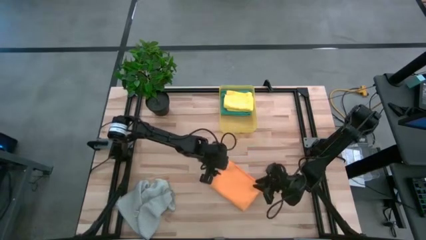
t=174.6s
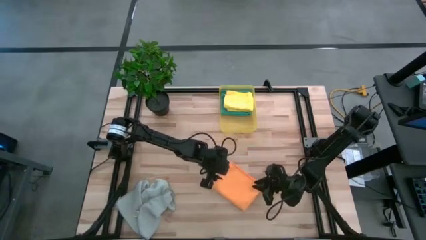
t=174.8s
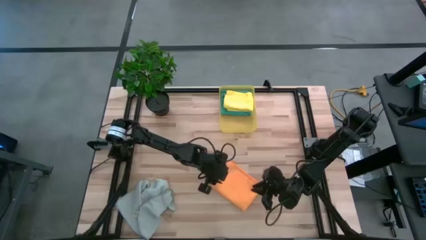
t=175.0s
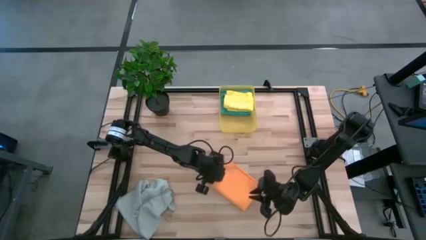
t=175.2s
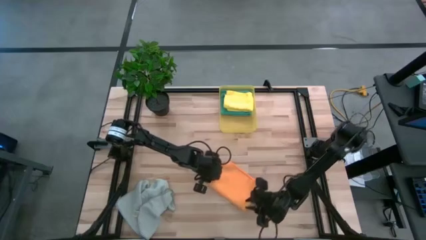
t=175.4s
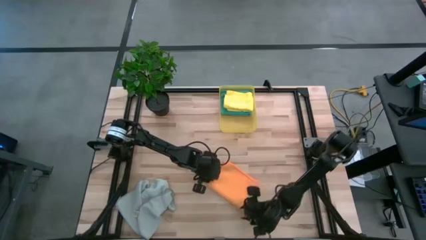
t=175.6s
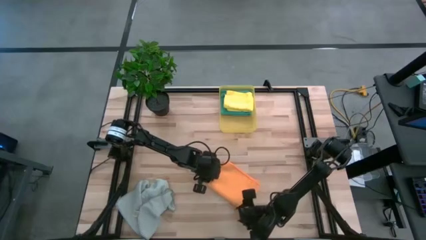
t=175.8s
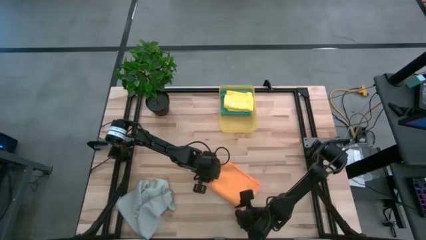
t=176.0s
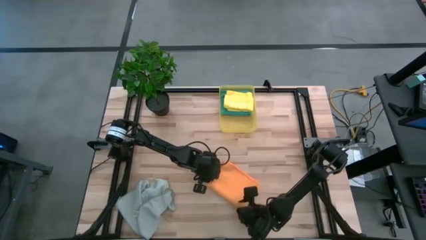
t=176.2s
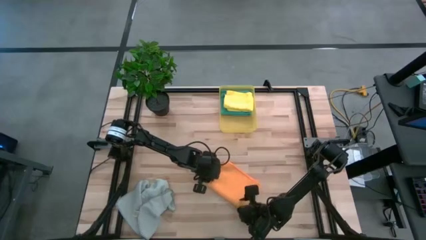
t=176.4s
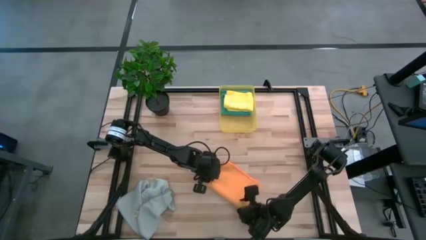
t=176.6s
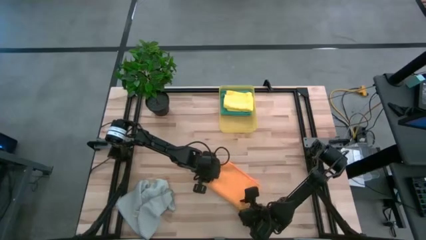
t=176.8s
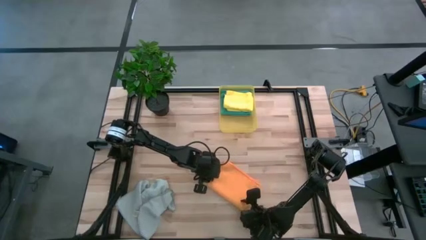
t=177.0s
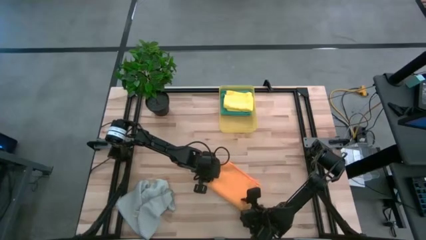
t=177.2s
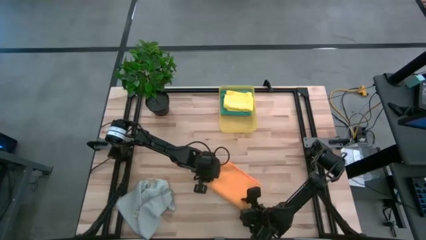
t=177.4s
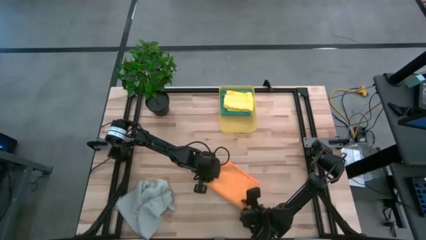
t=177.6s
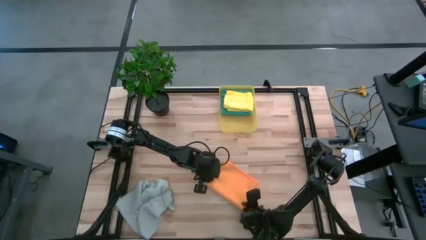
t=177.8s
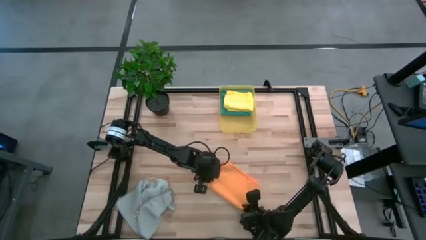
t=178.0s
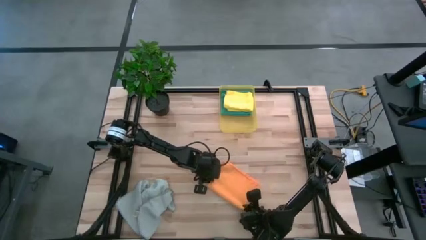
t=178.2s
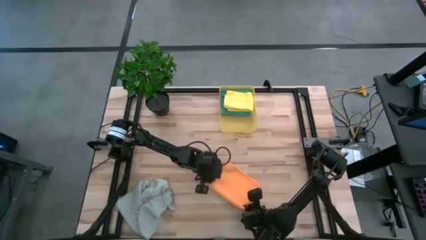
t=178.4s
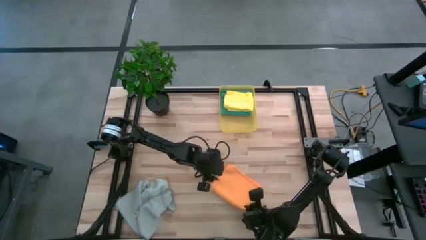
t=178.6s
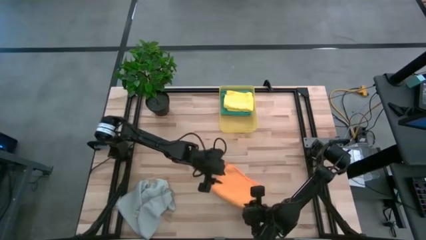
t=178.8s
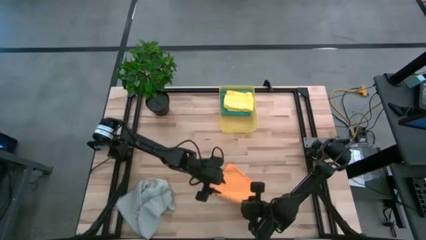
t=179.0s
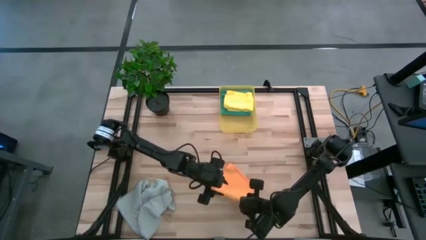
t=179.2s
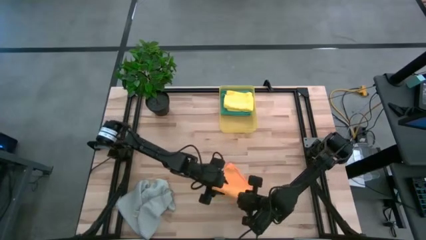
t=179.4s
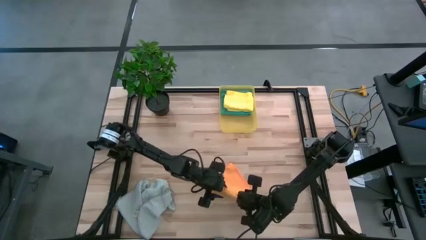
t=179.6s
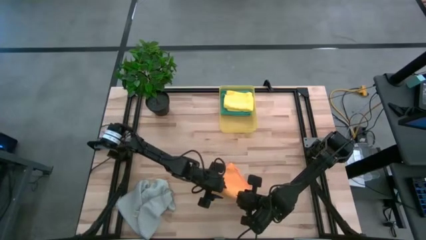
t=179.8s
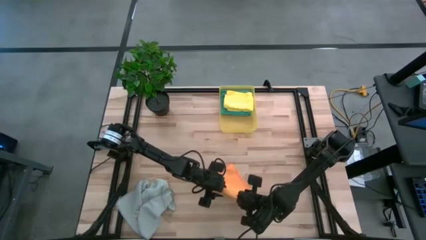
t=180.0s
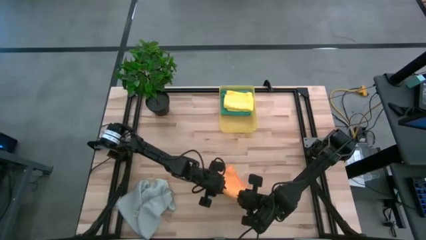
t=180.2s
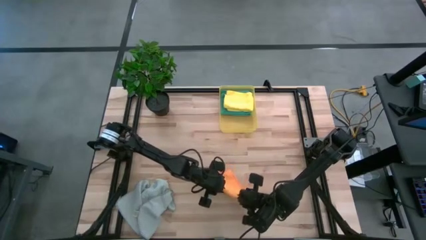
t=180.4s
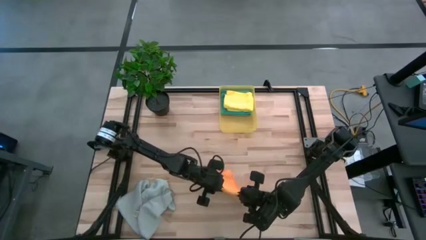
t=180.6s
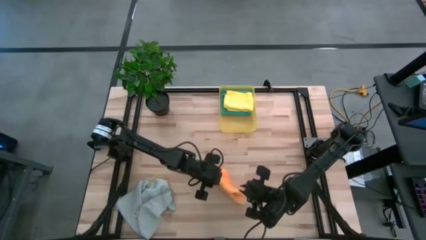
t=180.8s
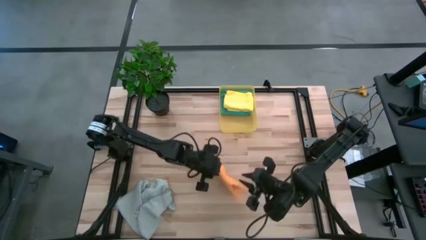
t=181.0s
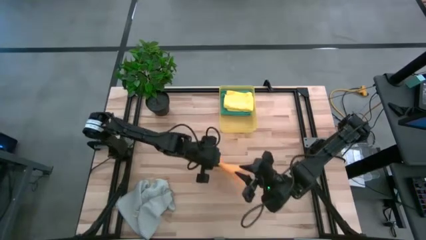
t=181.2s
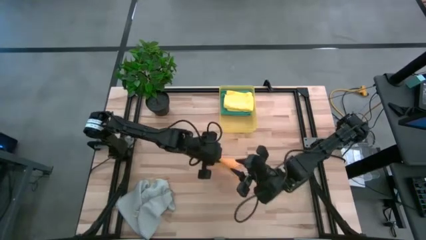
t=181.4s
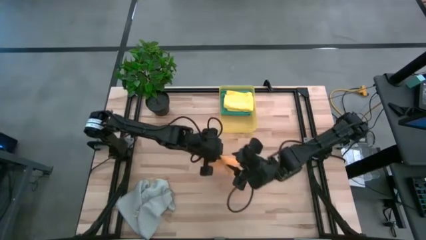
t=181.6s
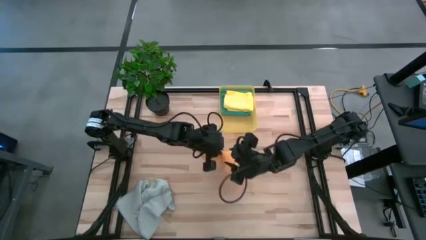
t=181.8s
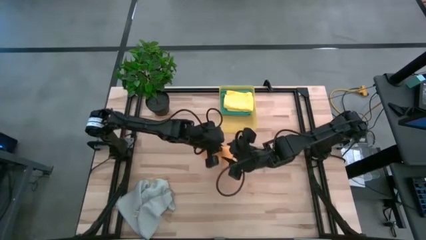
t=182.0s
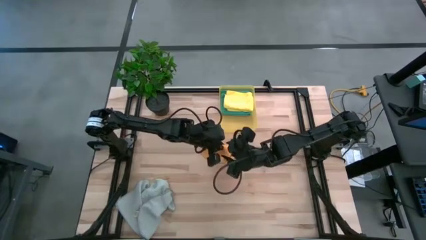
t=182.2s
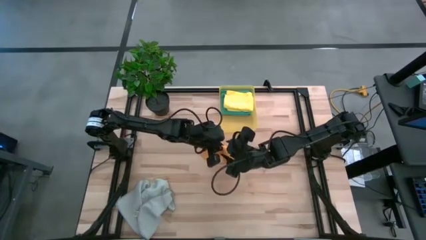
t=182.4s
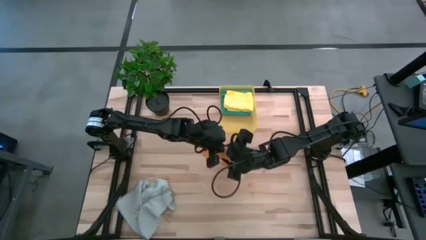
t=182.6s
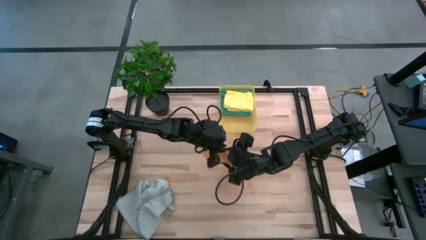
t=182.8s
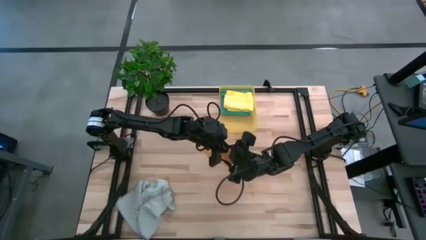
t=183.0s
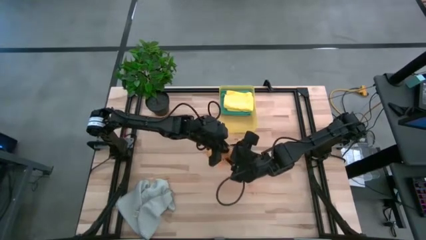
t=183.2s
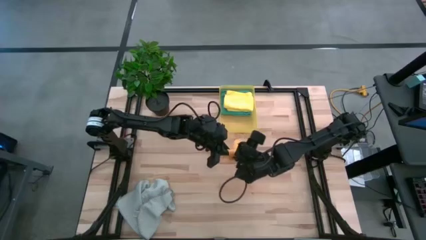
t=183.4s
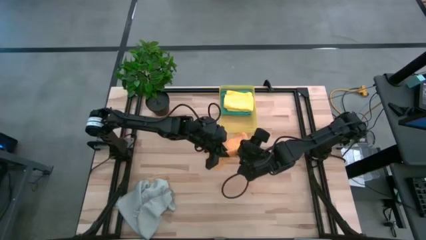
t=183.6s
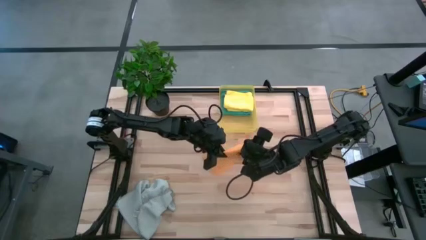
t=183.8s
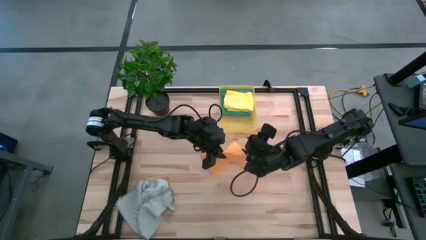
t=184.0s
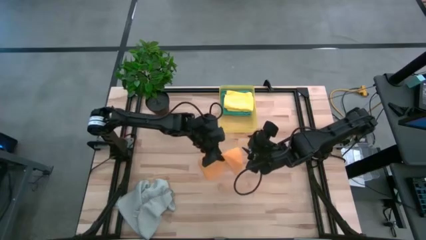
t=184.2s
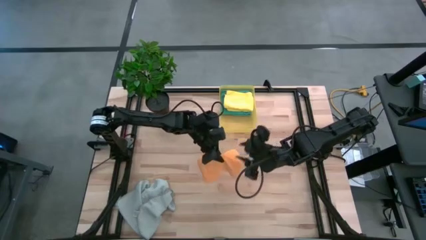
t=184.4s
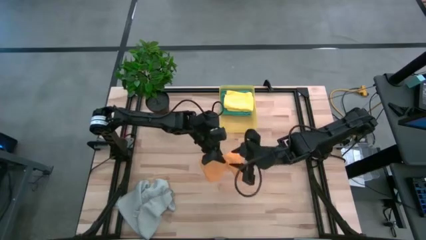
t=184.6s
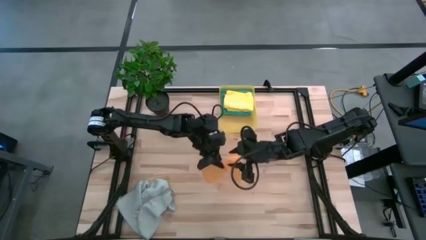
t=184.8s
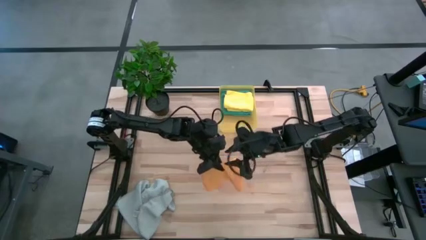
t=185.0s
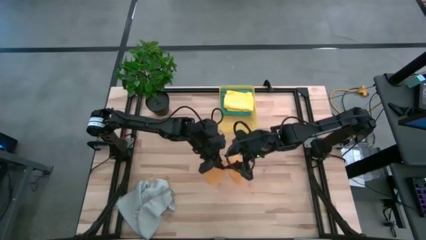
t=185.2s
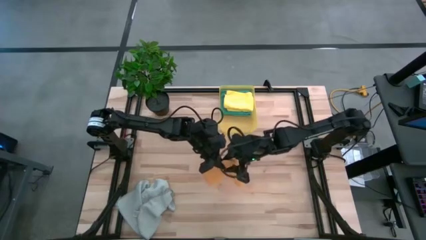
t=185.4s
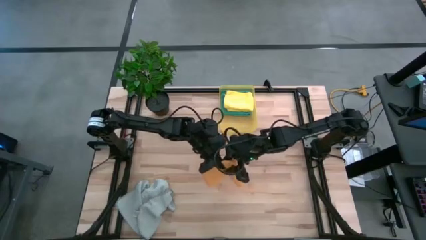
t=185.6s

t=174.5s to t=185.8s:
Task: Fold microfiber towels
Put the orange microfiber towel into the yellow bin

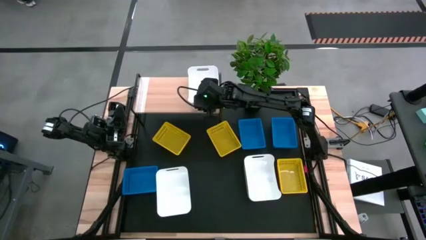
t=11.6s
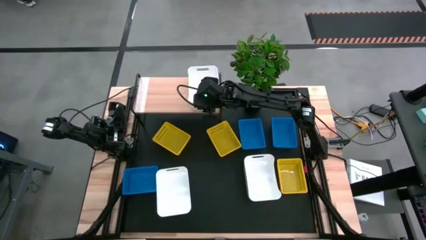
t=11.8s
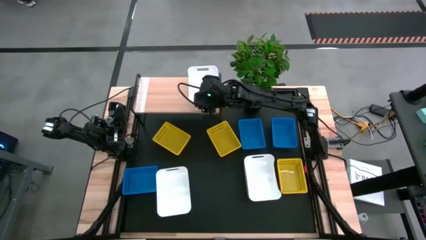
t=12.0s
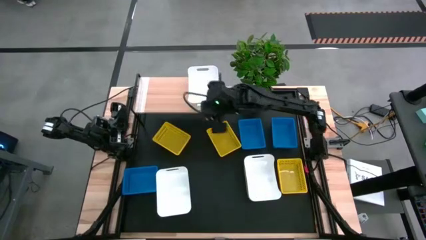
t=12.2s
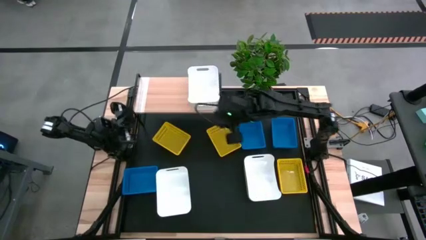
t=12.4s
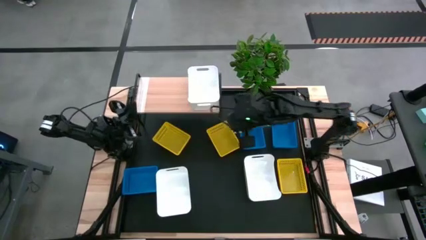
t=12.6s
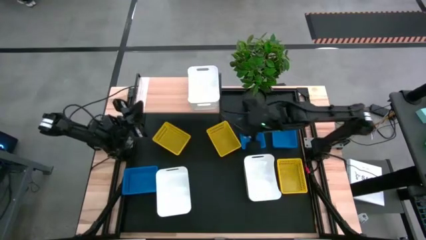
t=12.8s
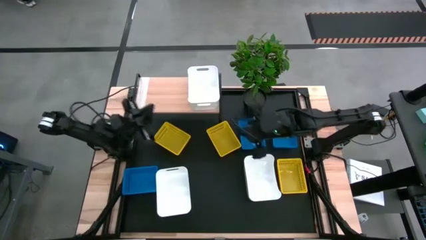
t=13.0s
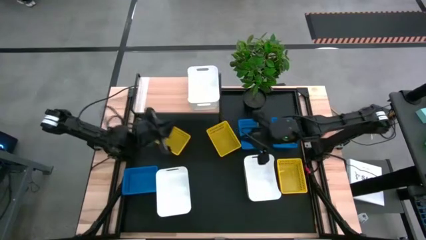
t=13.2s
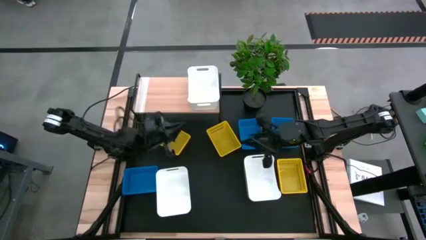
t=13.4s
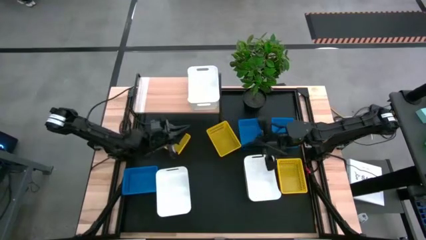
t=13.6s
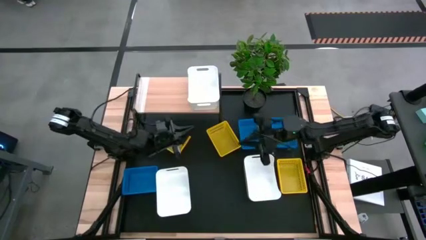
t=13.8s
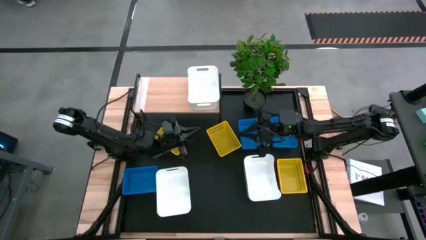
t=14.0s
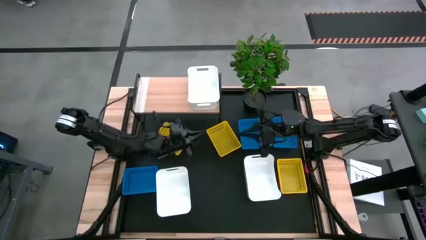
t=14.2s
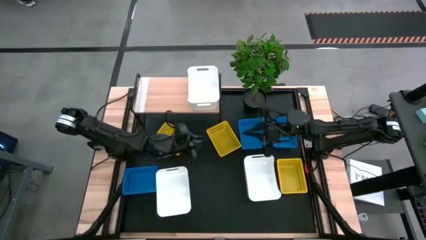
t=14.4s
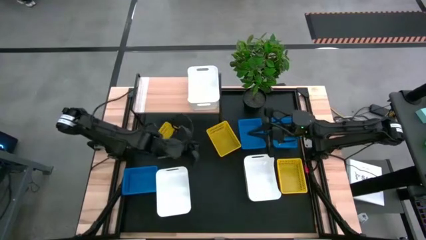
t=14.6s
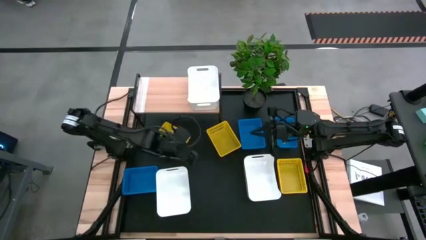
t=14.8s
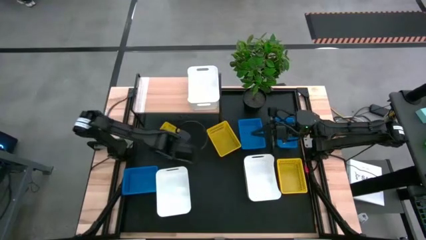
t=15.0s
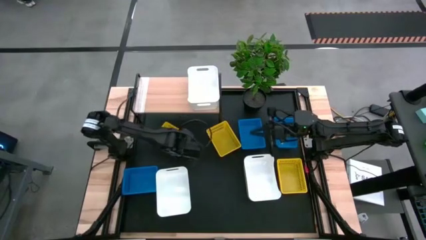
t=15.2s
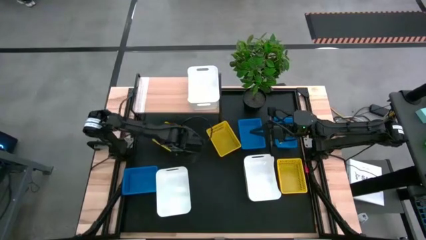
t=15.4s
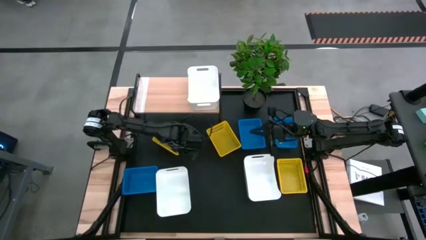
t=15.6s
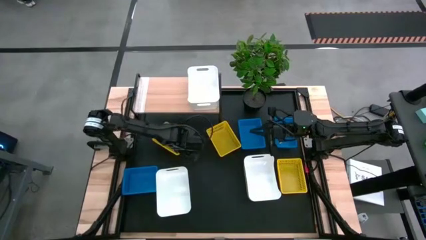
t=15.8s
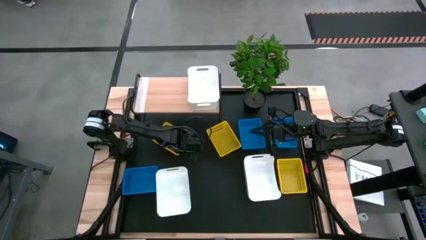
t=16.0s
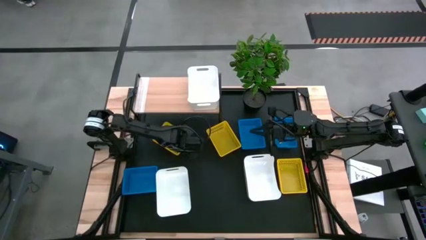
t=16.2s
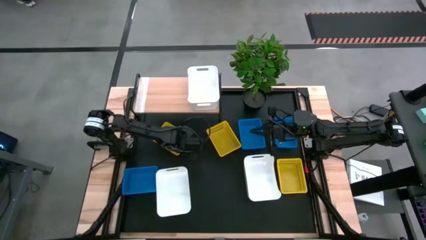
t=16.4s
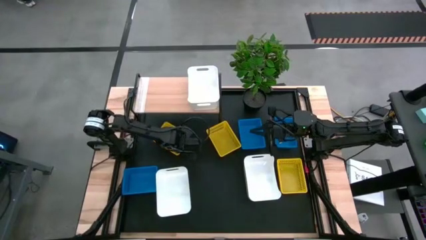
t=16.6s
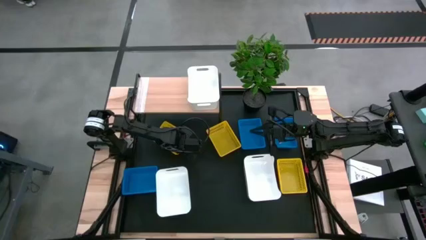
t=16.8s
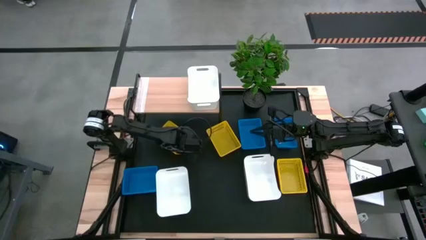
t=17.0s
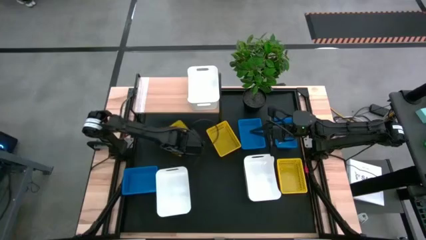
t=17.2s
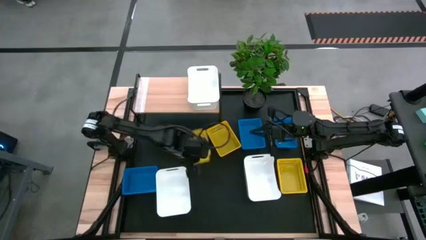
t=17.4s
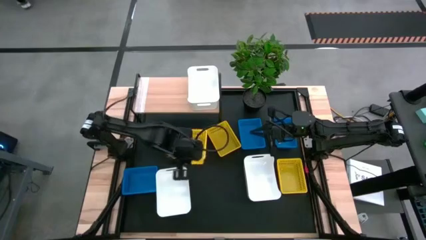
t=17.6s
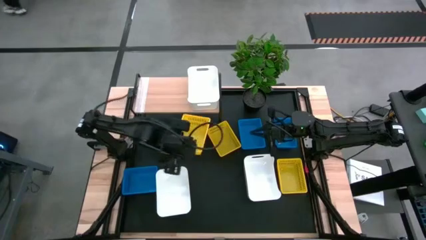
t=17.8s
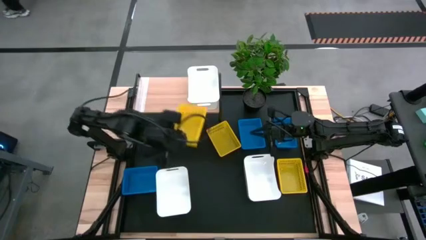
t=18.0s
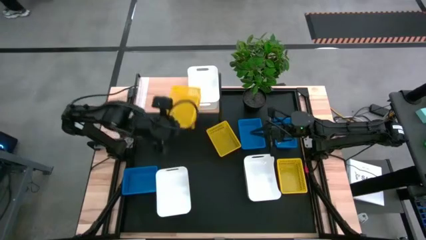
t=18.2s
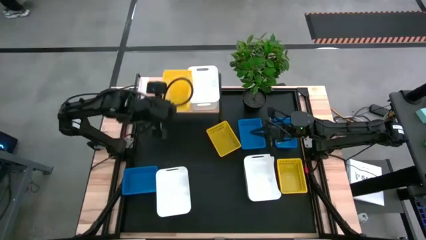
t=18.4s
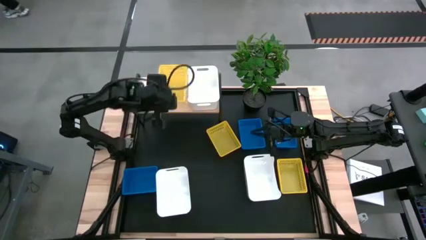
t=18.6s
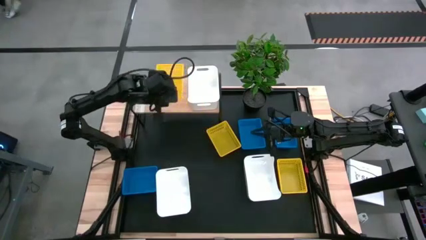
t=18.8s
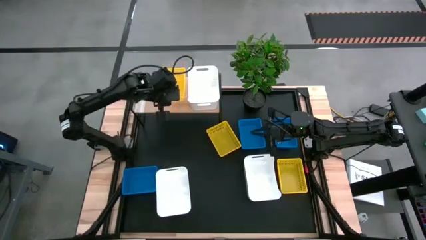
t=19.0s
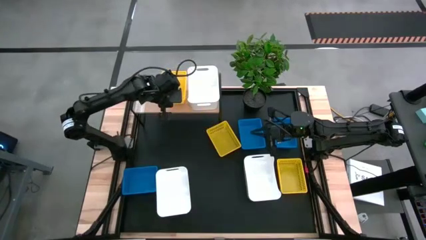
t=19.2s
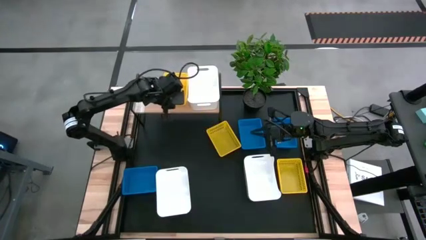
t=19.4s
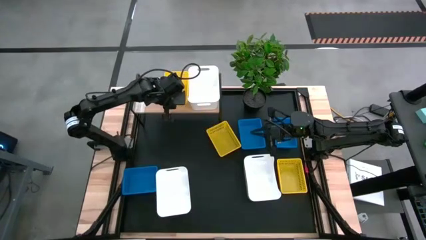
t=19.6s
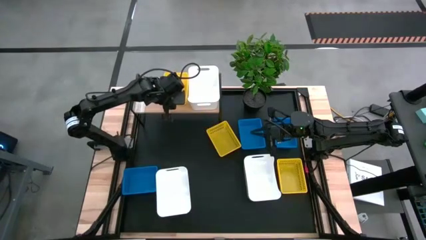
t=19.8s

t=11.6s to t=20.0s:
Task: Stack baskets on shelf by color
Put the top left yellow bin on the shelf
